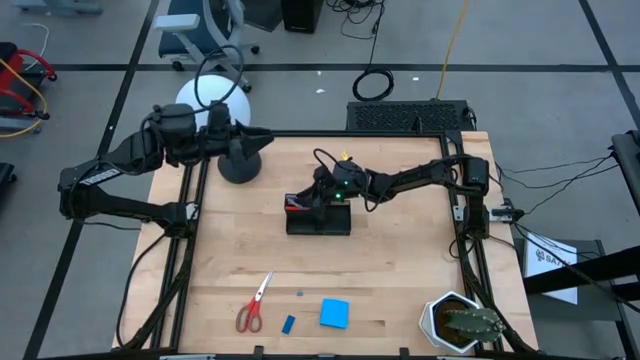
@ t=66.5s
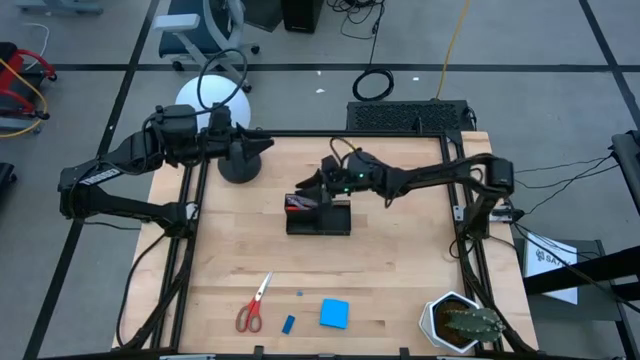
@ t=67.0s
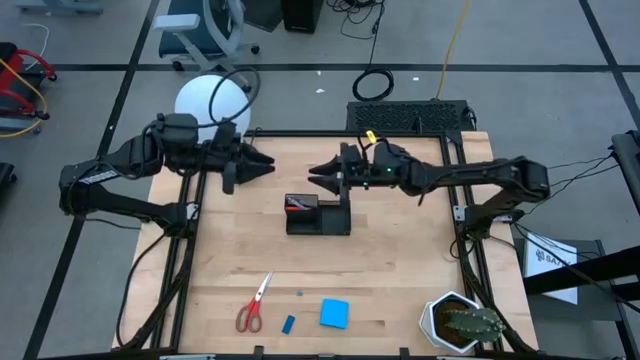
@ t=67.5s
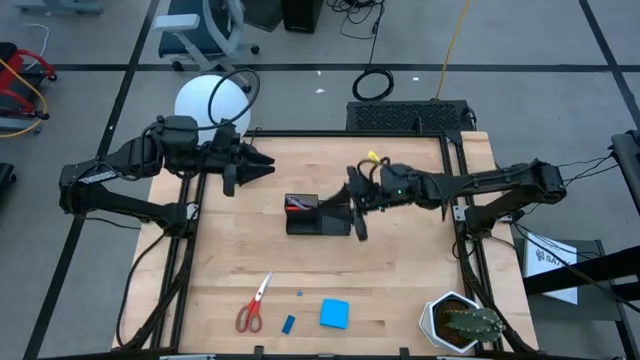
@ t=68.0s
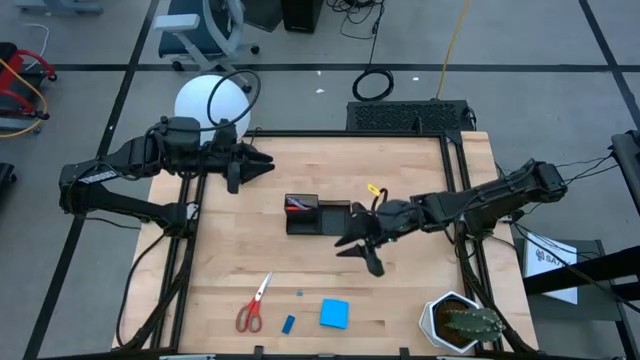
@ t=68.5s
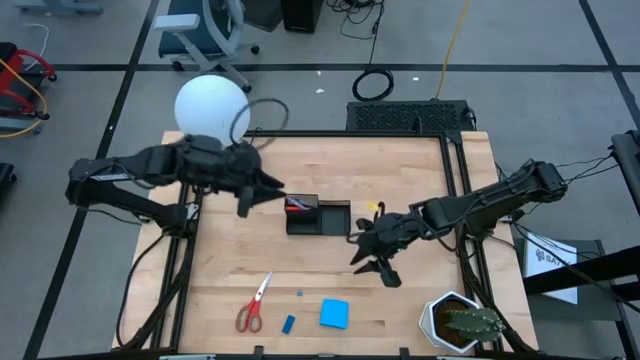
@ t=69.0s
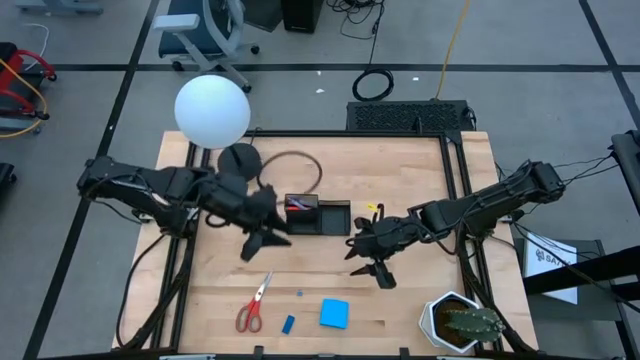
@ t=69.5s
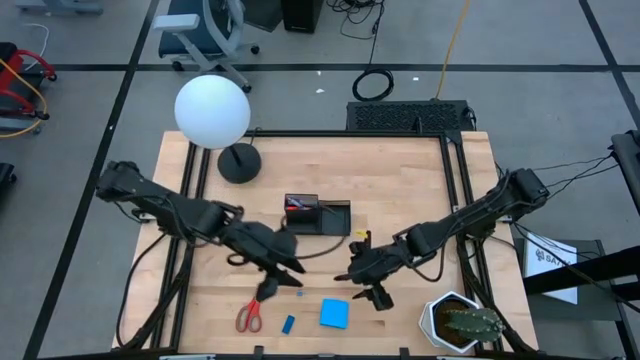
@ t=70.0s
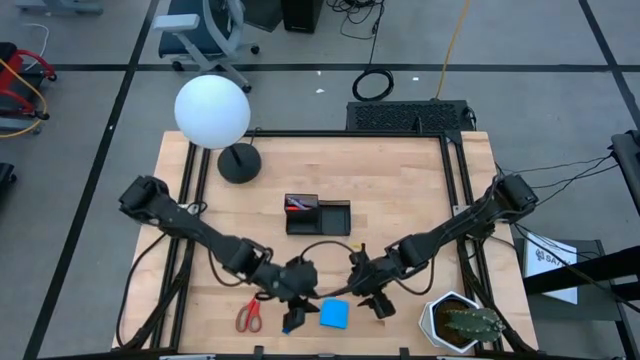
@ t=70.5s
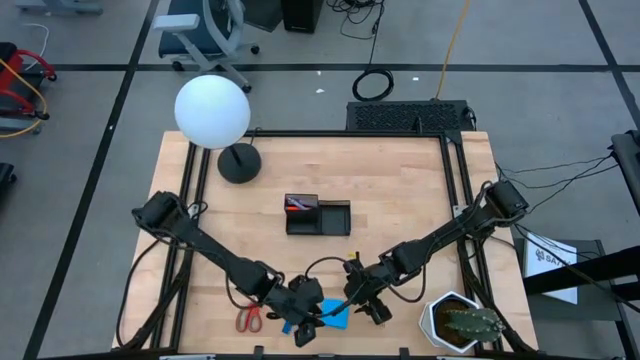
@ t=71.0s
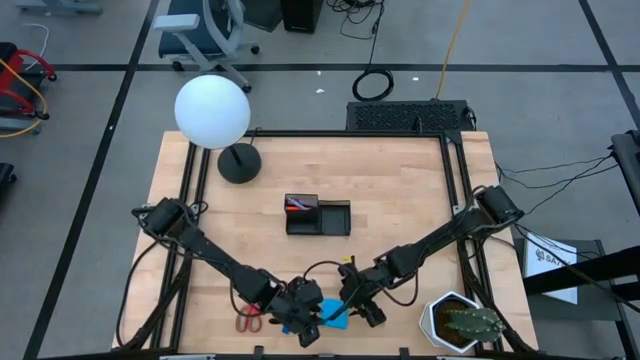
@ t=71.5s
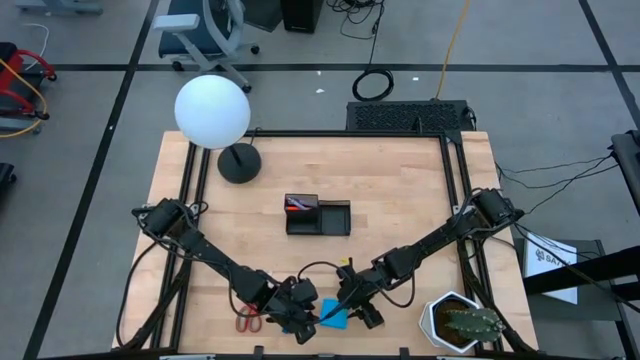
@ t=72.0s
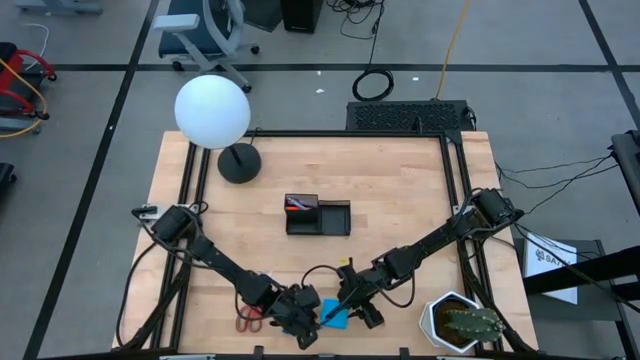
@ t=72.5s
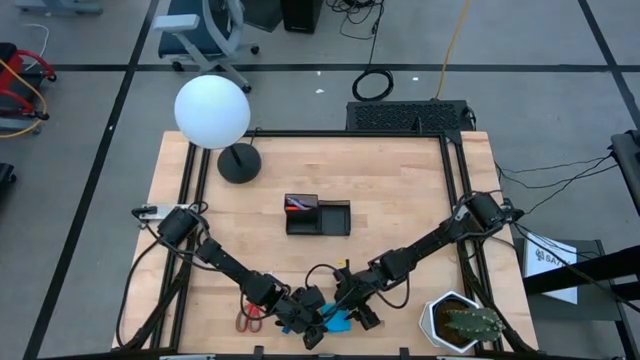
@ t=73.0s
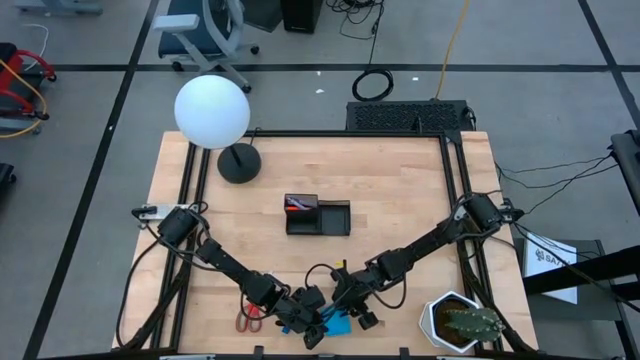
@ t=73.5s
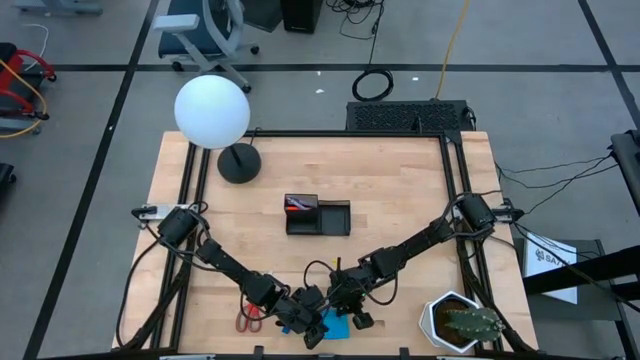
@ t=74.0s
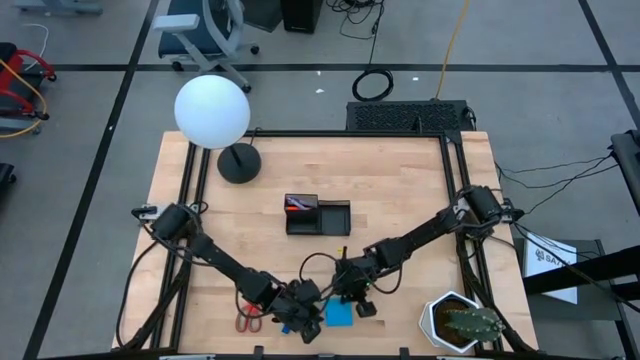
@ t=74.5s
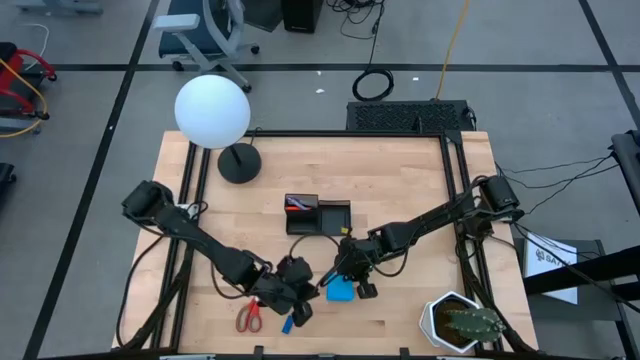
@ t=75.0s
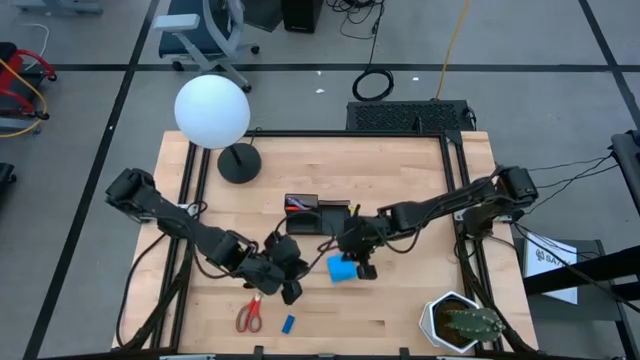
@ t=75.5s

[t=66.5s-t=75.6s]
Task: Pick and place office supplies into organizer
Put the blue sticky note into the desk organizer

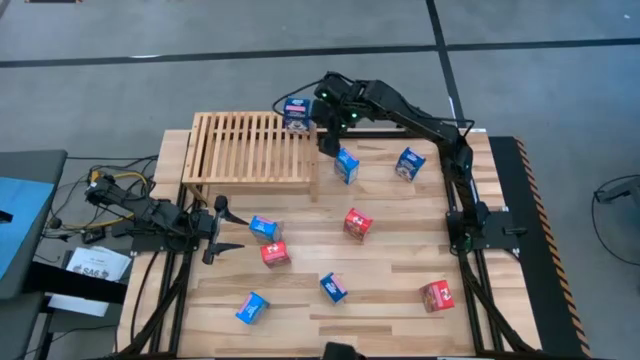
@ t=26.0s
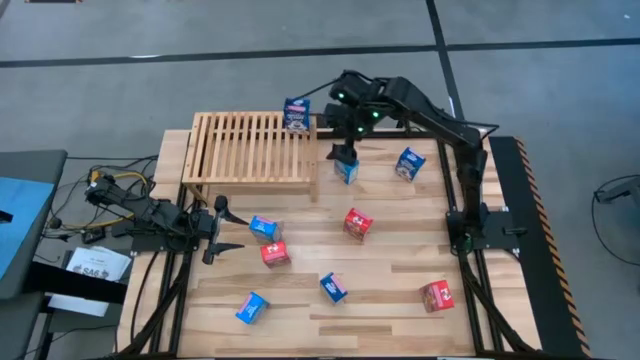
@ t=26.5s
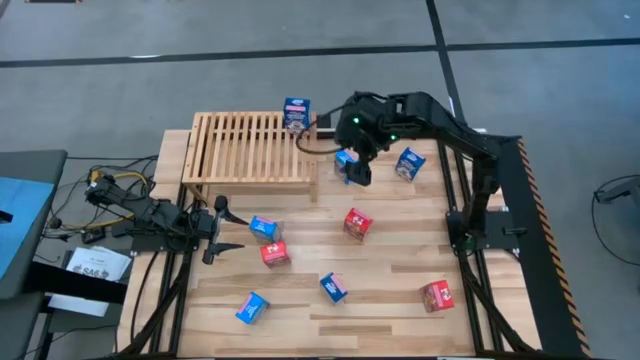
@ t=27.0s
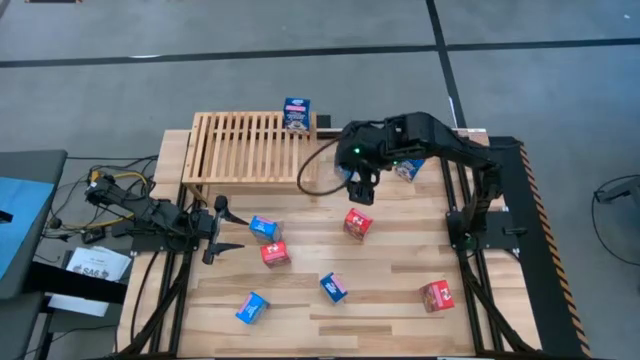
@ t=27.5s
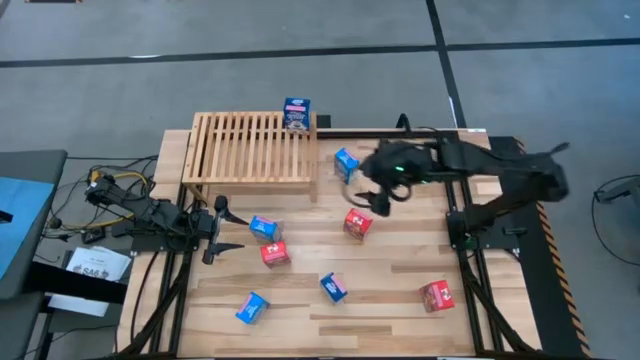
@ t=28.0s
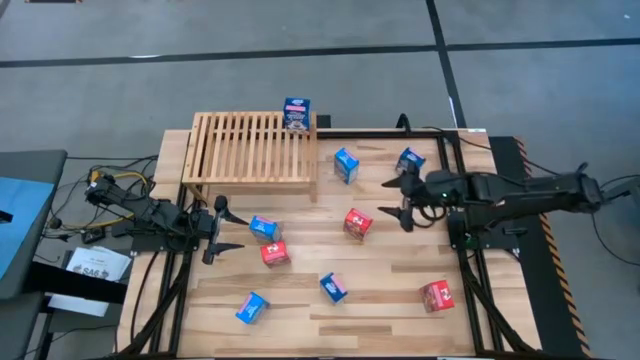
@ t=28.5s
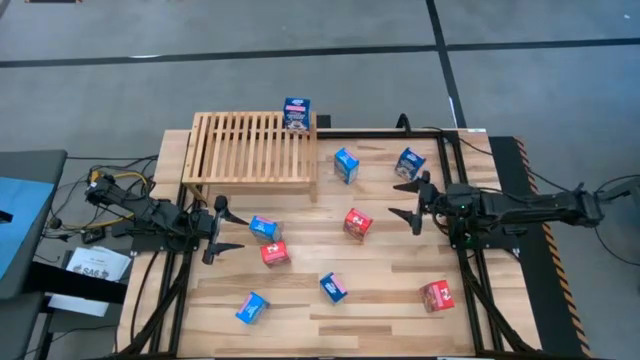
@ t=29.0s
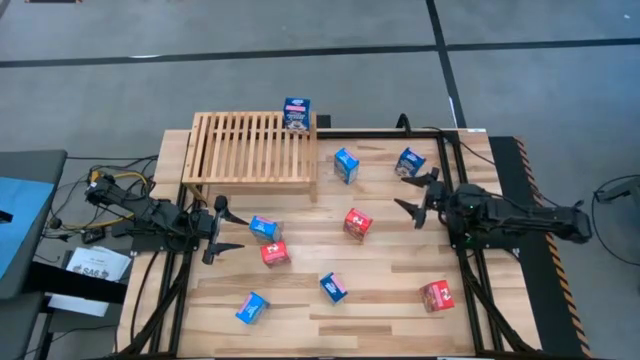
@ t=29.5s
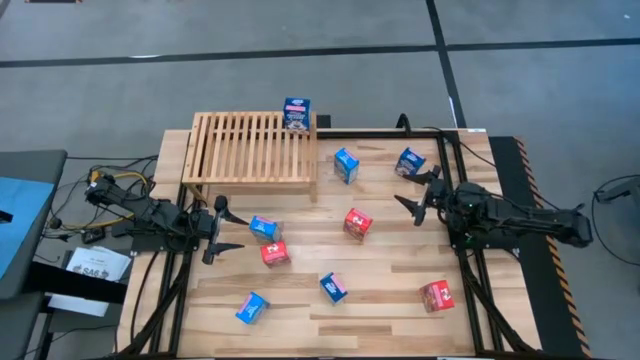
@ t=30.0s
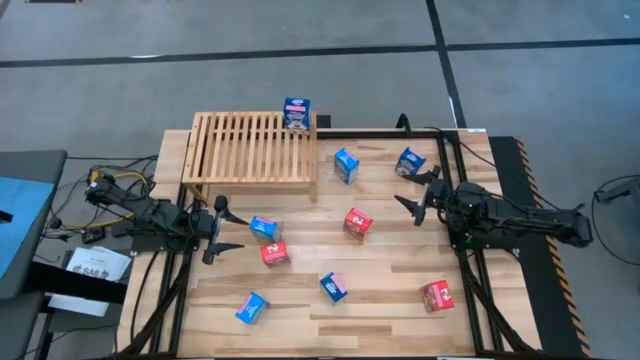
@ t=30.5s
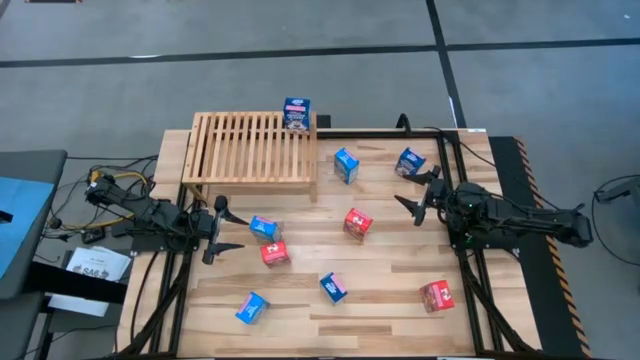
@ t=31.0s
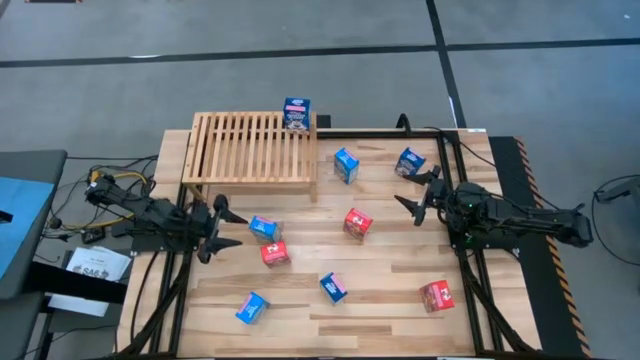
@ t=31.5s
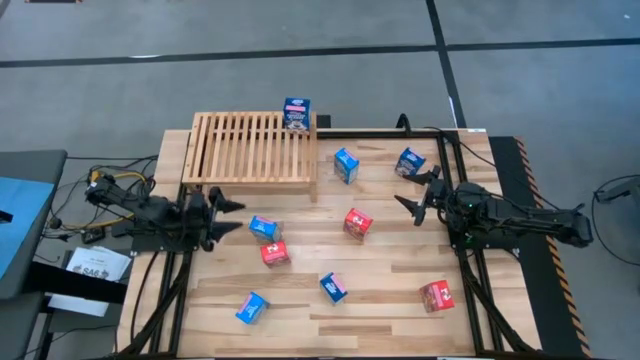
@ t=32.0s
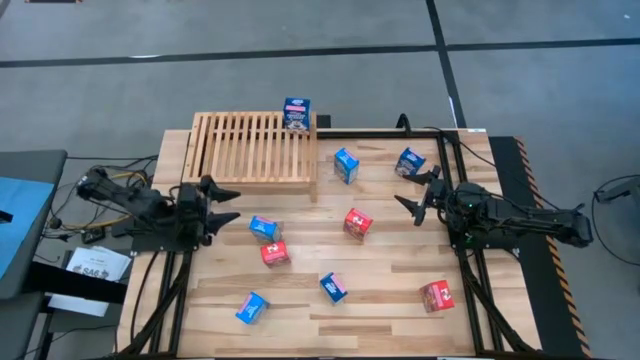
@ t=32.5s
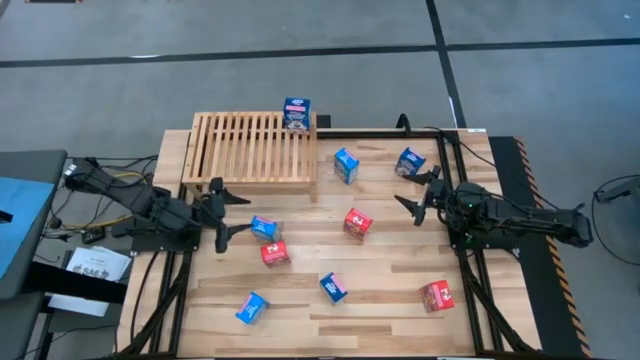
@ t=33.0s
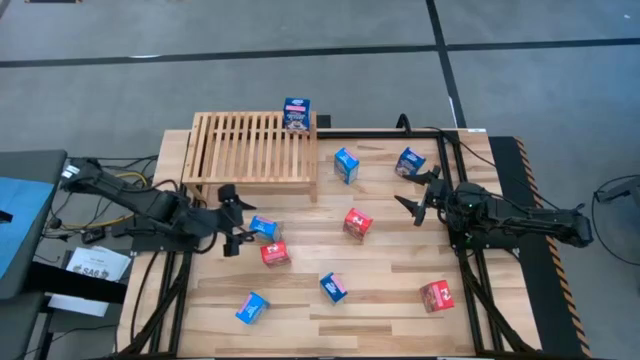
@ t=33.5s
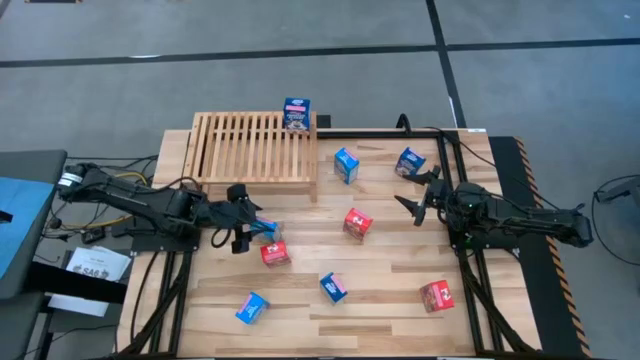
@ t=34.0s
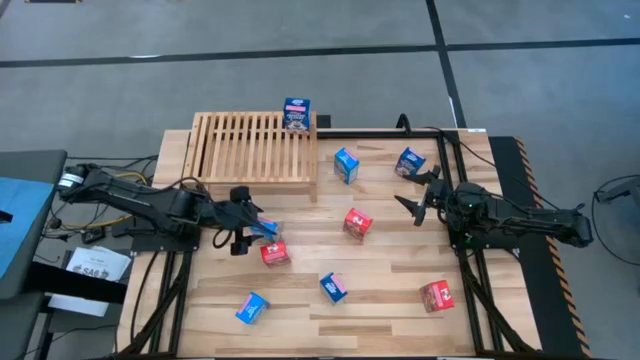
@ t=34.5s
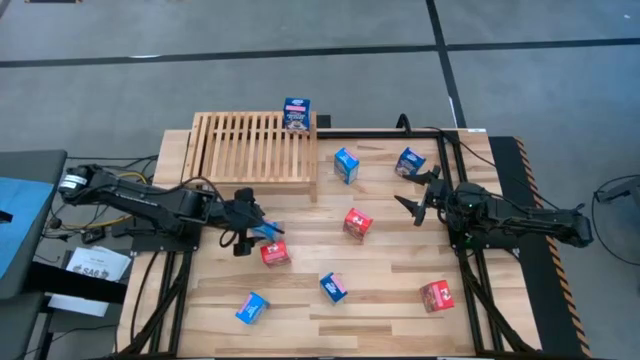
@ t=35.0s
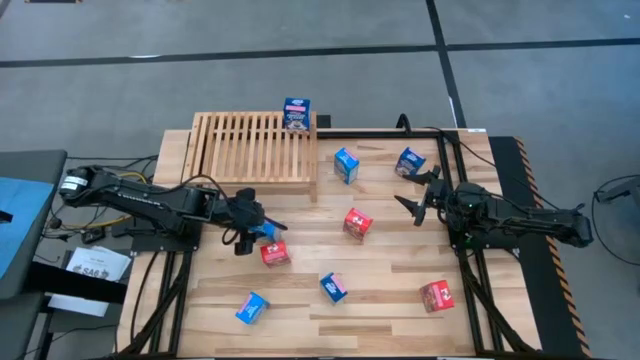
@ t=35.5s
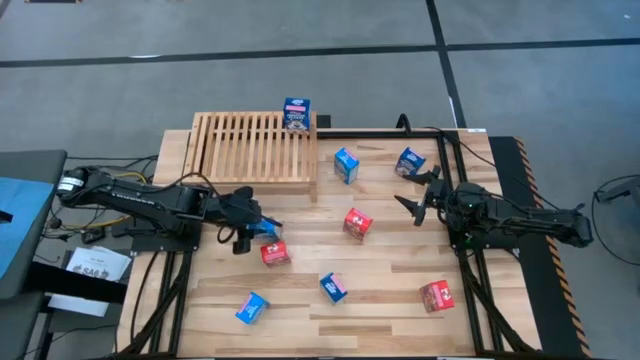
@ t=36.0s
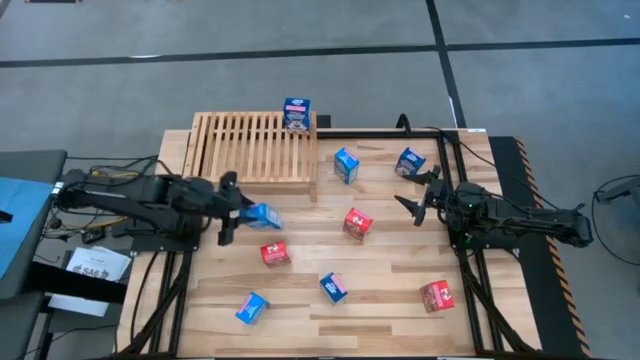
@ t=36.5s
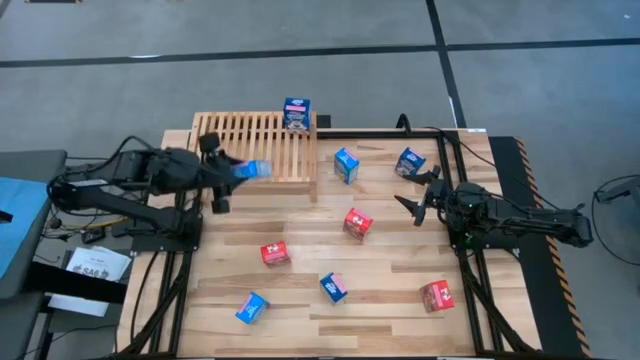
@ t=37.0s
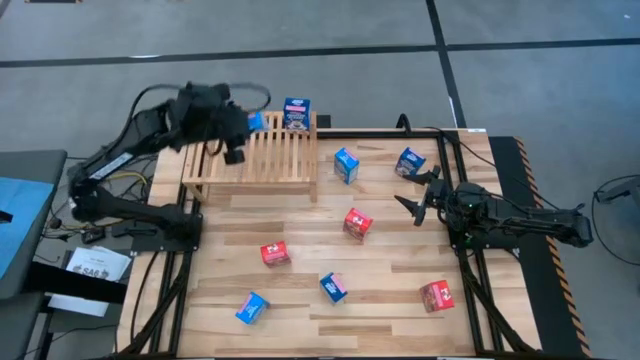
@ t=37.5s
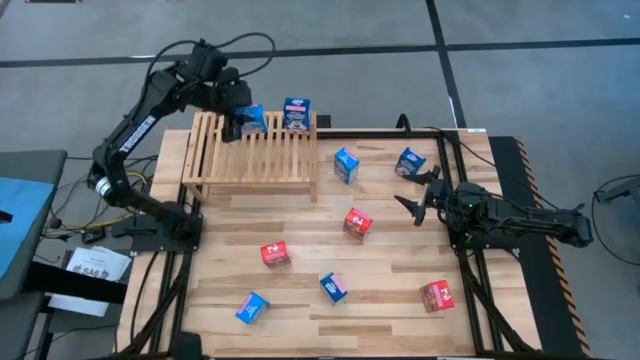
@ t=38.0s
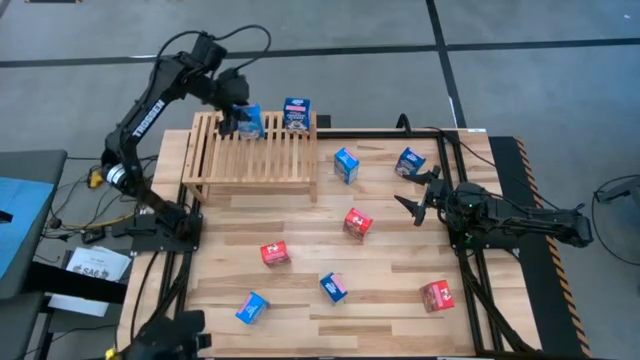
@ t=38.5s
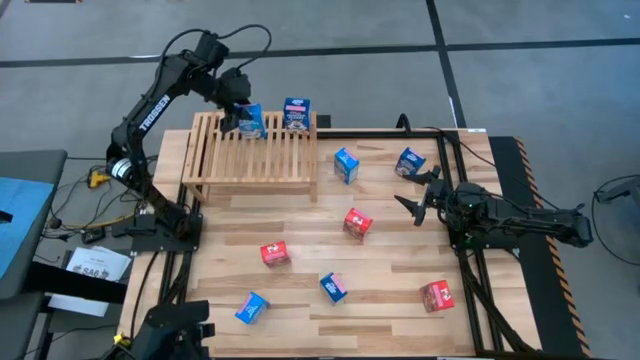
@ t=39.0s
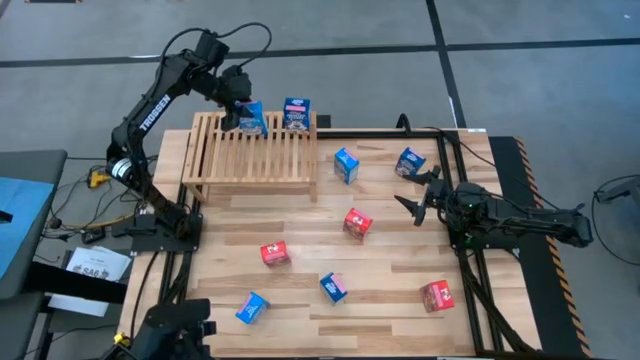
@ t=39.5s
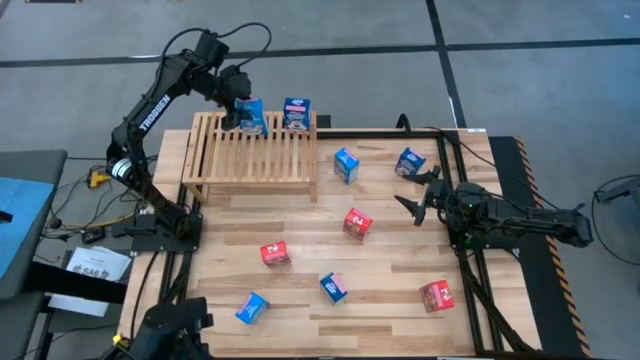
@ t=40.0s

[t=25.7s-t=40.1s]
Task: Stack cereal on shelf
Put the middle light blue cereal box on the shelf
